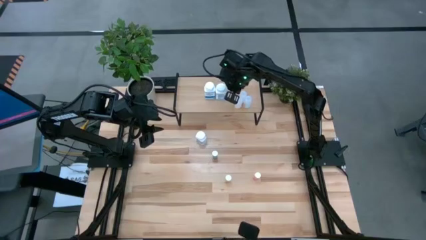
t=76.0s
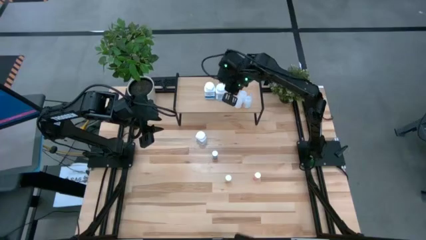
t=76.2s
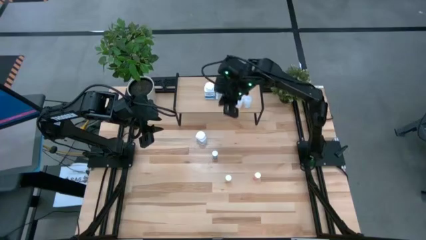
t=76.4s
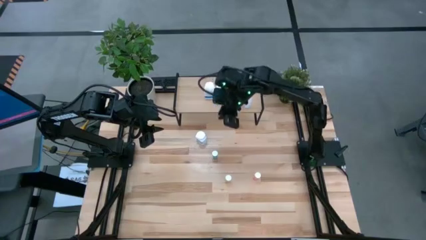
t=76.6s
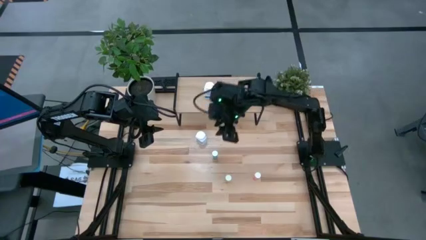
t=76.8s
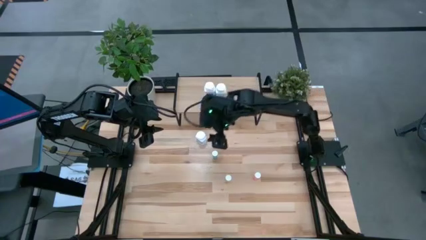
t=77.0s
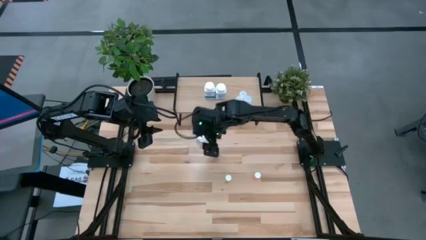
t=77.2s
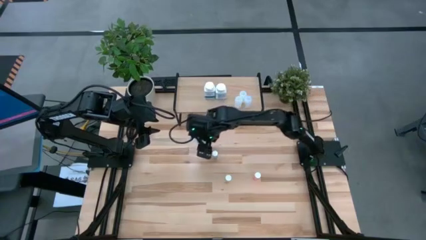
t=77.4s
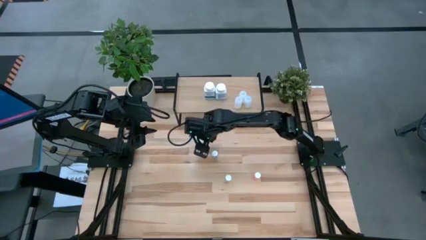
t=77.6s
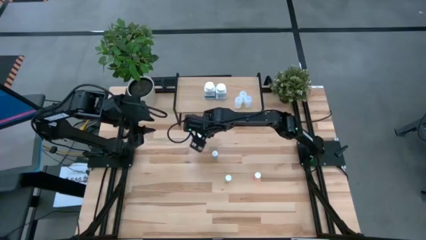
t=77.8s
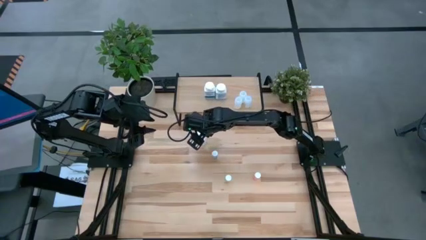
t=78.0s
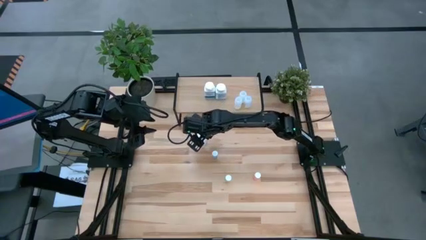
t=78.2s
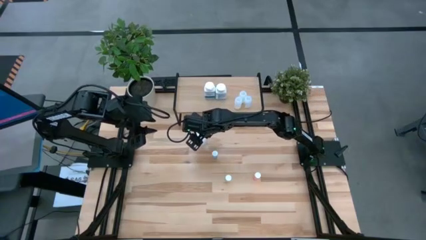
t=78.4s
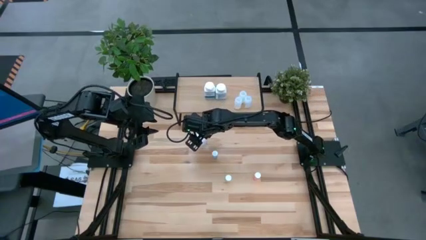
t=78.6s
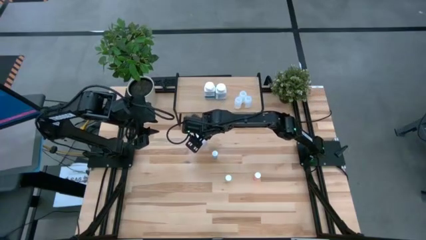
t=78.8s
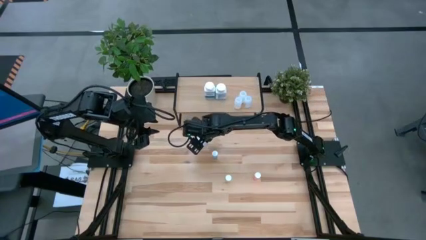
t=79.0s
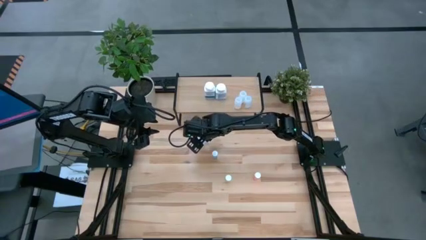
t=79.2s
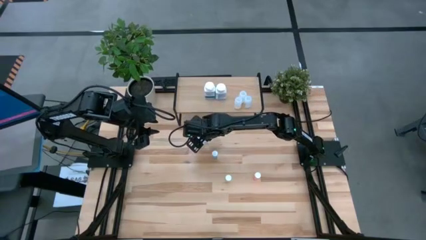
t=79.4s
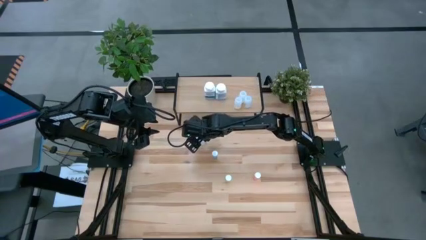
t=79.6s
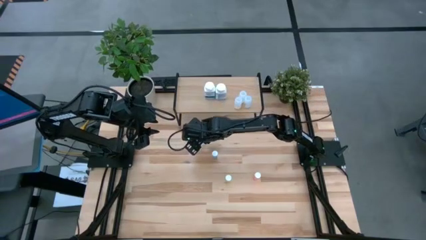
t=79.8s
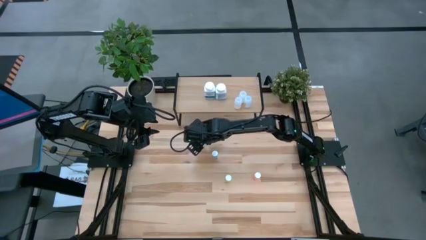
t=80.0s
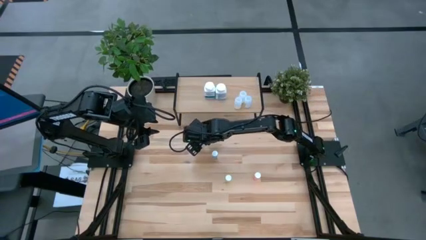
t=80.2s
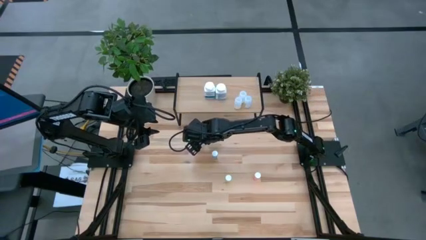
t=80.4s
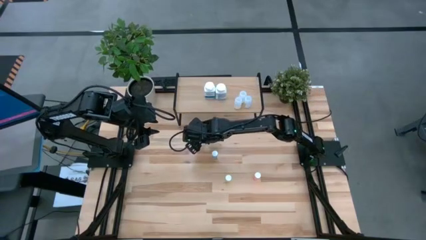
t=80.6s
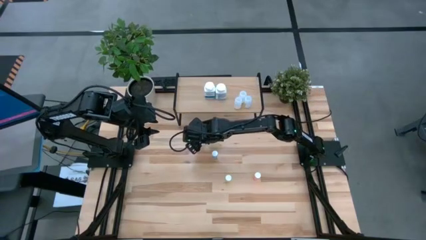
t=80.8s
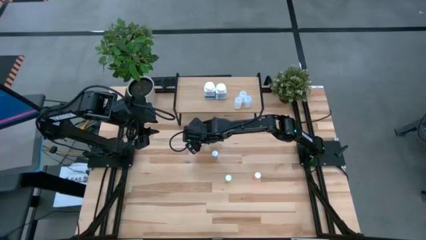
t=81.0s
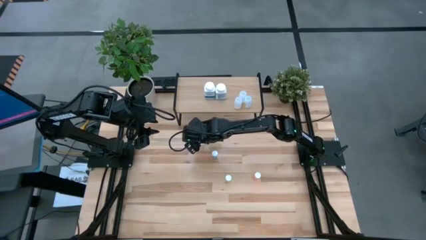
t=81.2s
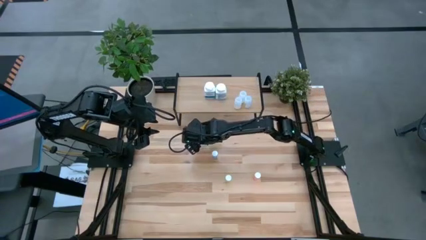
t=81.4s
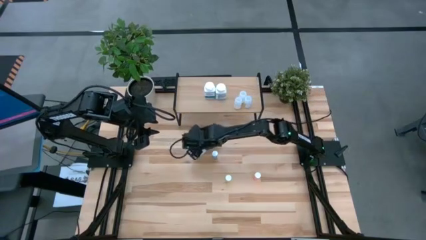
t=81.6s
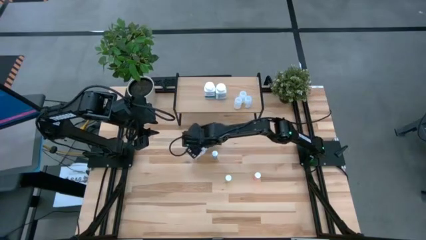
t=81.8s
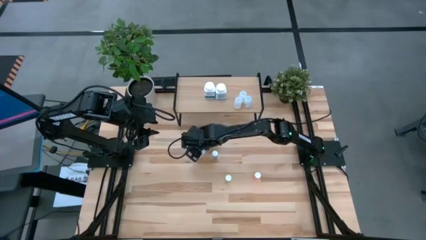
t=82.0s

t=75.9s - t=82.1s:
Task: Pick and place medicine bottles onto shelf by color
Put the white blue pill bottle on the shelf

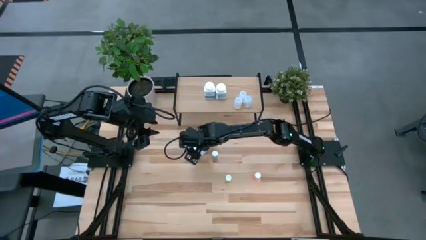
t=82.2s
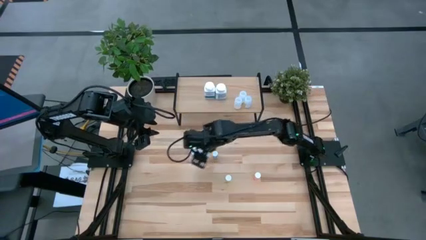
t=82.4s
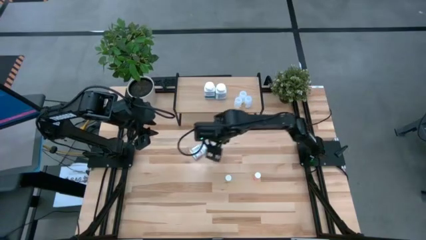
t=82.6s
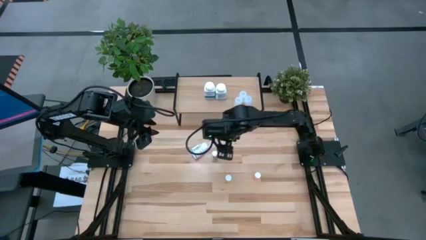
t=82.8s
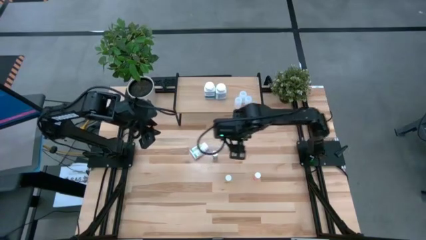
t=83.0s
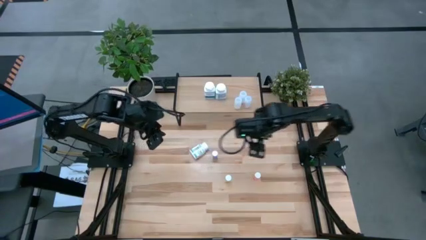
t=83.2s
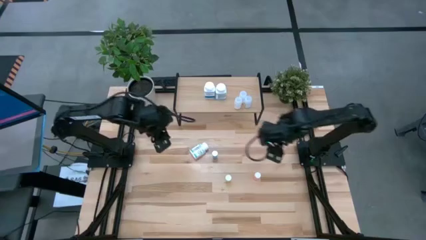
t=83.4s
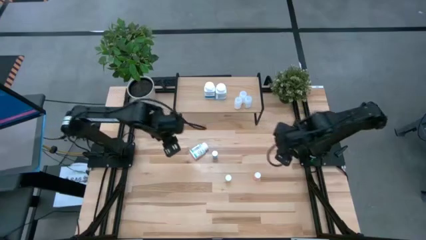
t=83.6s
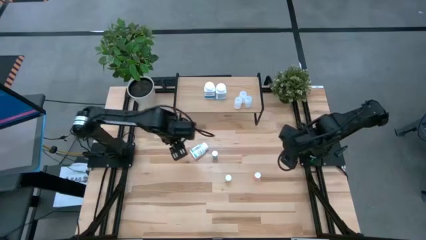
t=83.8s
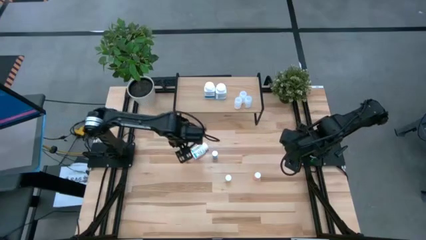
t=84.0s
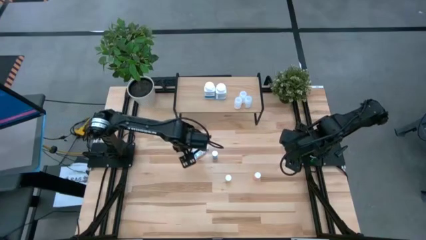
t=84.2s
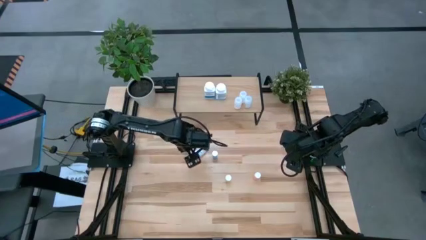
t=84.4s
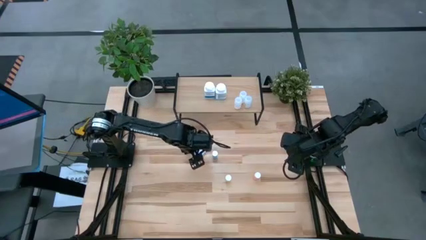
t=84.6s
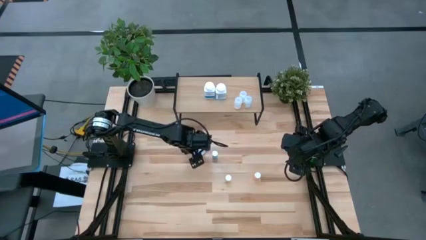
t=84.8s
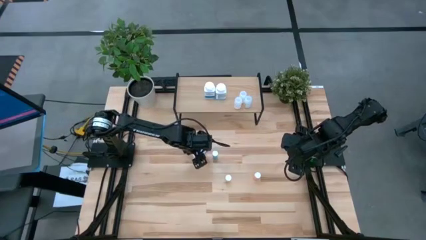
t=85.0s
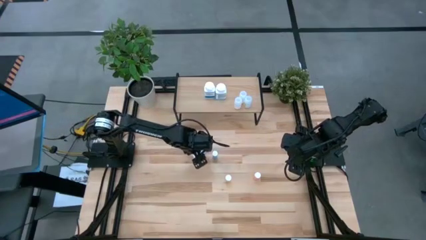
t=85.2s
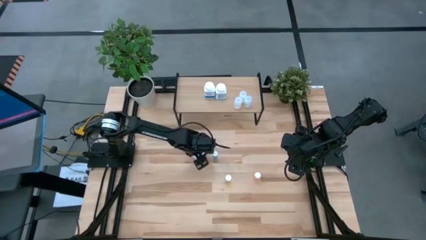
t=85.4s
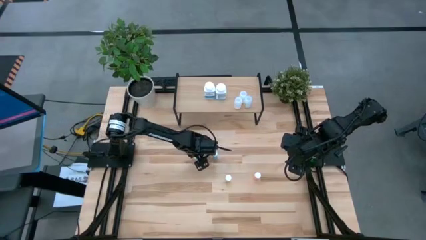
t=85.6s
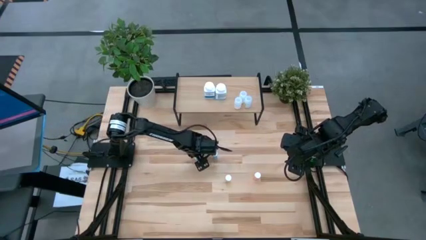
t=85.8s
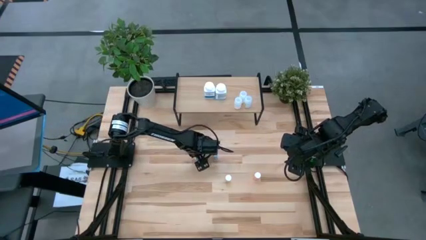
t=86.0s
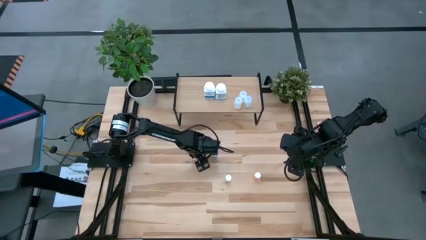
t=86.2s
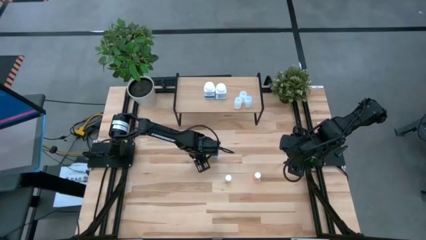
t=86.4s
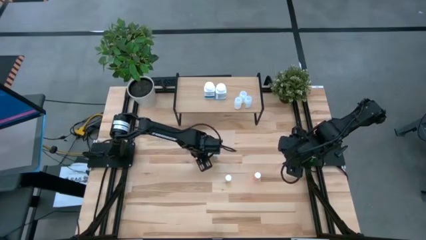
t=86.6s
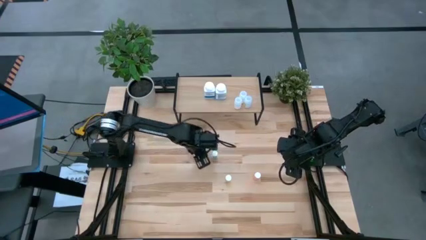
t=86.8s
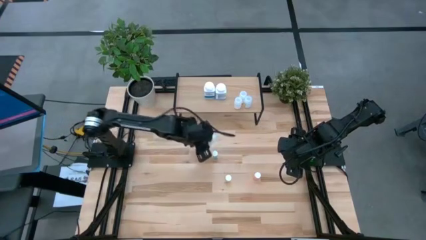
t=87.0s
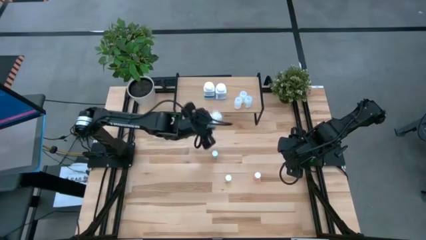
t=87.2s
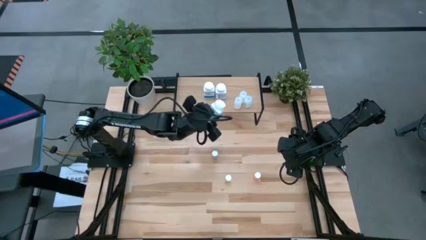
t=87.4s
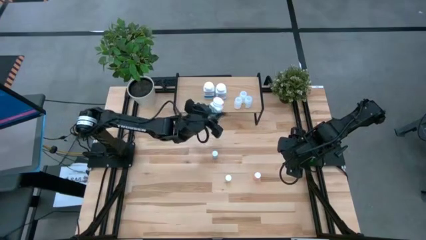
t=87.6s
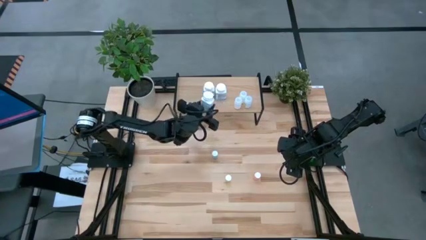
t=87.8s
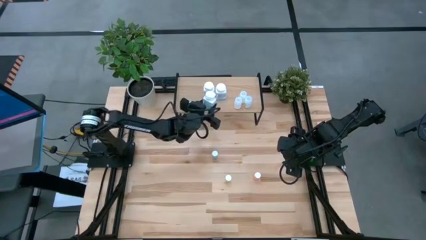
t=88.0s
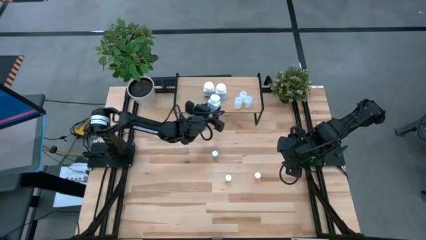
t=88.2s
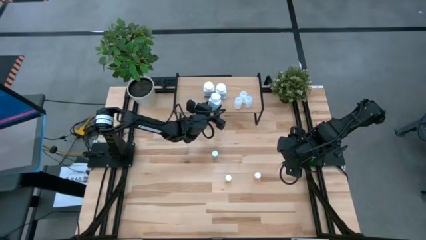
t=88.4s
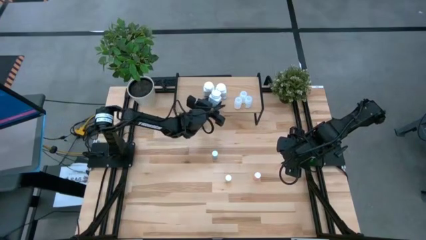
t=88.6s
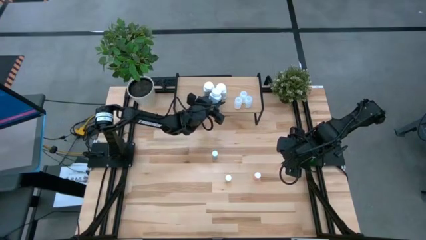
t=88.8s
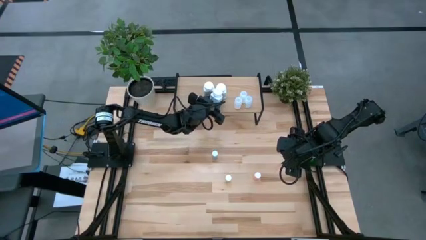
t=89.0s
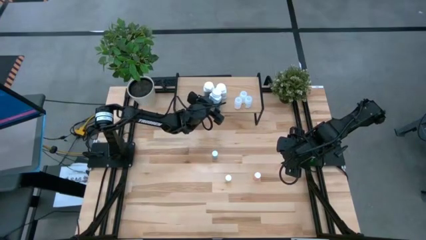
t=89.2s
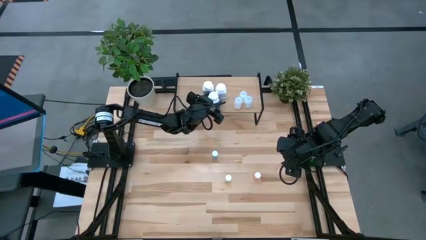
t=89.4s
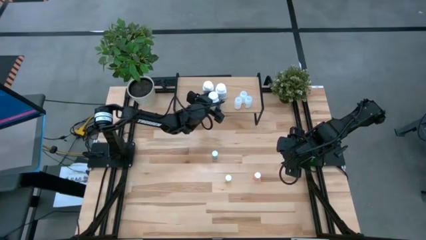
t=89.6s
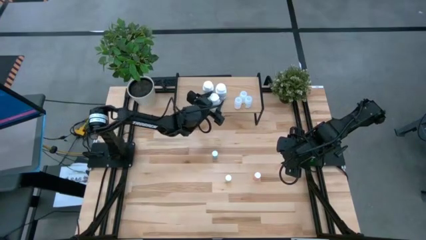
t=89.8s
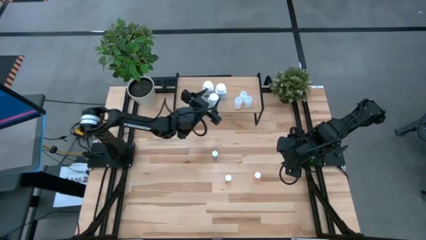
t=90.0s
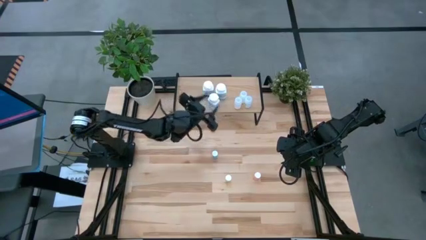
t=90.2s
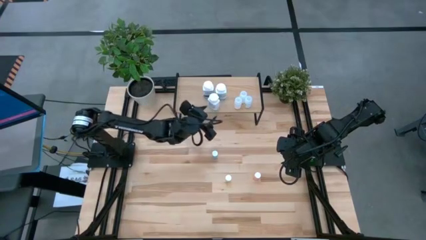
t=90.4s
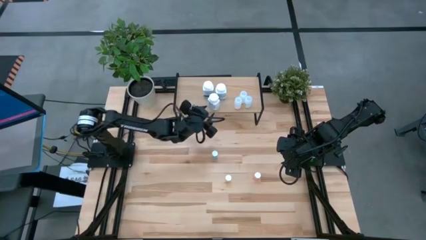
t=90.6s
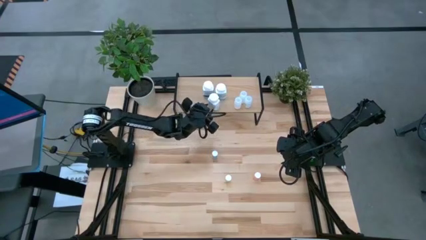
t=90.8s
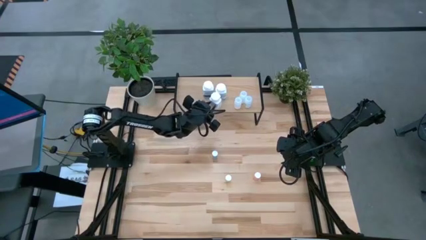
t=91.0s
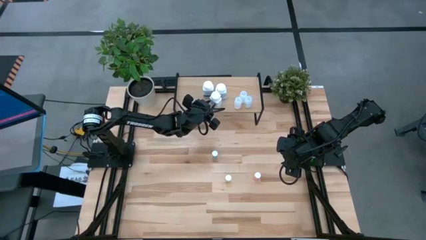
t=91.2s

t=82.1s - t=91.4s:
Put the white blue pill bottle on the shelf

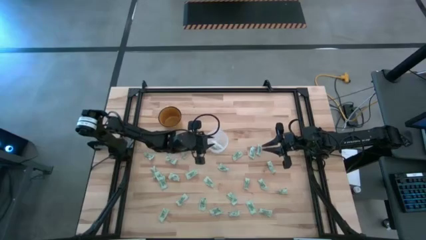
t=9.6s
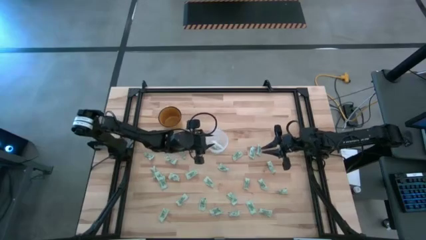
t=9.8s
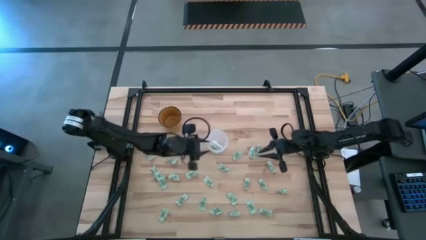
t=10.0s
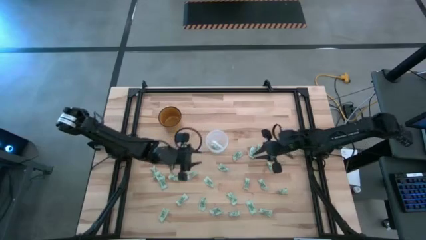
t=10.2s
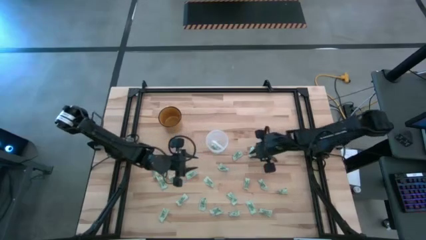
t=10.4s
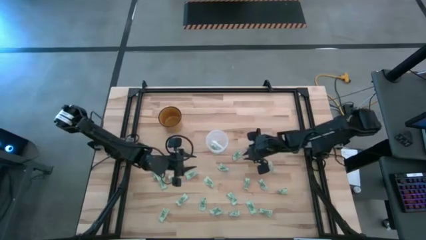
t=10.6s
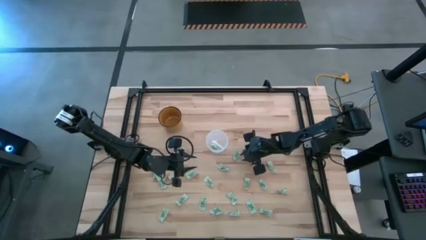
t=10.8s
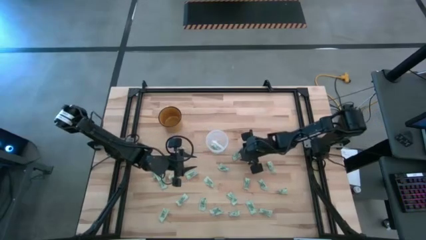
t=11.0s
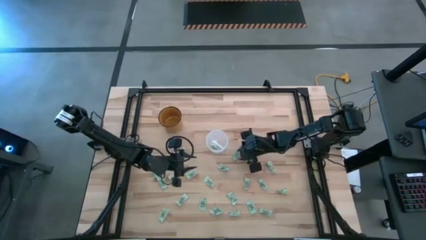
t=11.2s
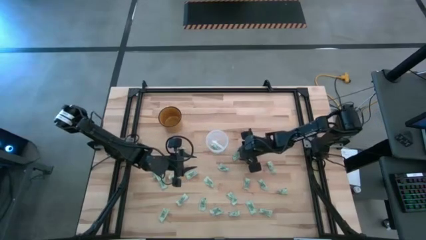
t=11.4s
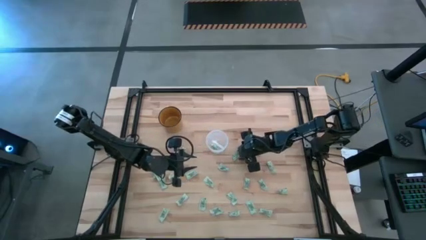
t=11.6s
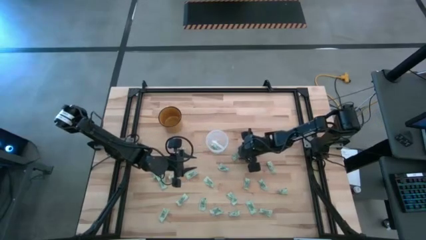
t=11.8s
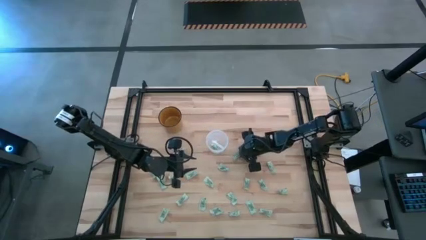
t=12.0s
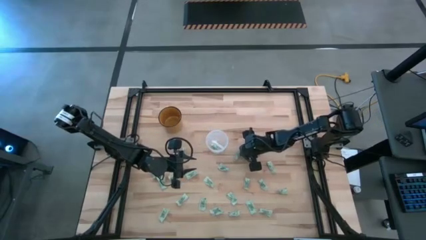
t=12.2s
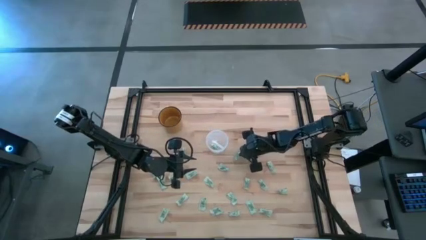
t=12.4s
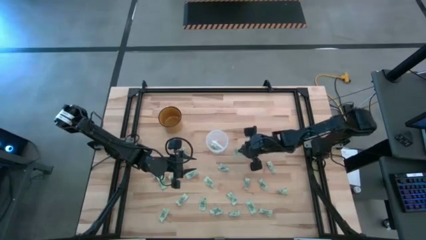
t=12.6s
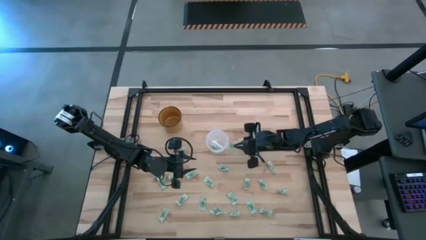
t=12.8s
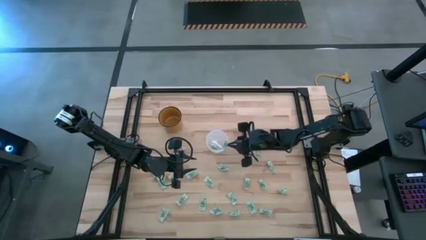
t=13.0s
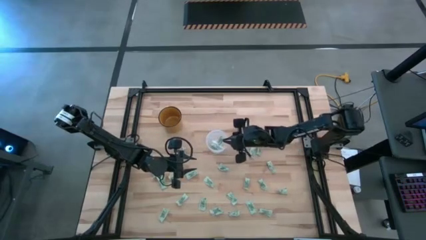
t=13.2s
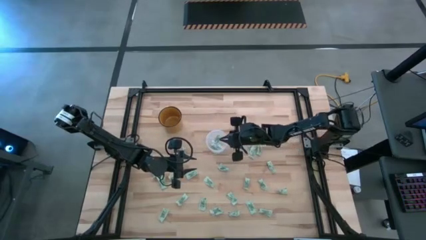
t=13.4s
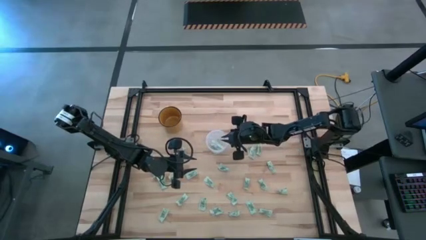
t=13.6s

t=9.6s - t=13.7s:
Task: Pick and place Stevia / Truvia into bins
Put the stevia packet into the transparent container
